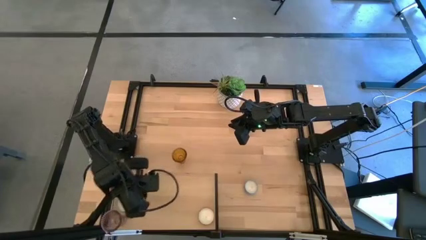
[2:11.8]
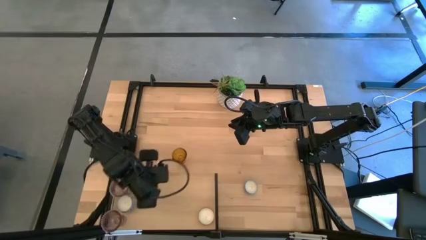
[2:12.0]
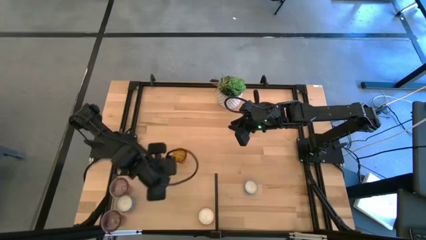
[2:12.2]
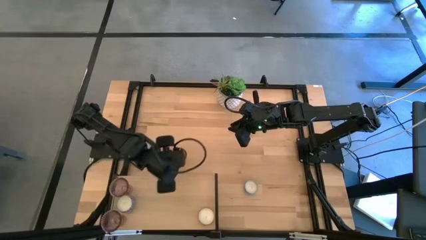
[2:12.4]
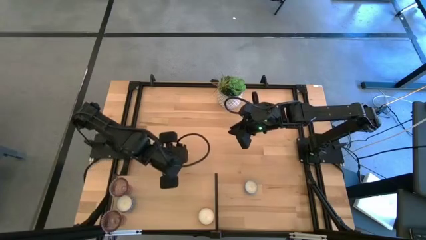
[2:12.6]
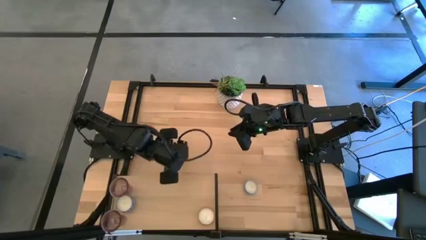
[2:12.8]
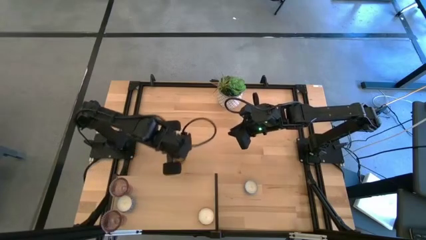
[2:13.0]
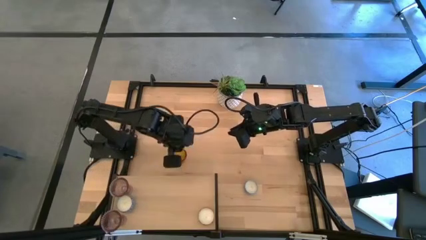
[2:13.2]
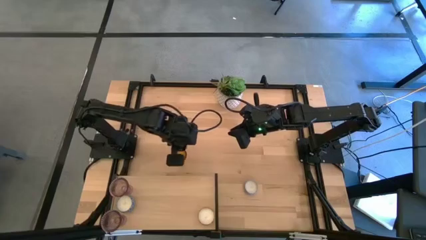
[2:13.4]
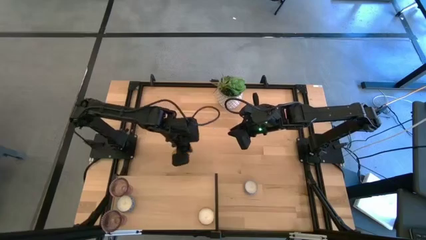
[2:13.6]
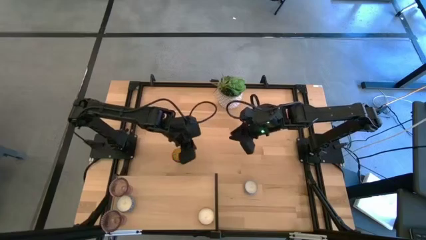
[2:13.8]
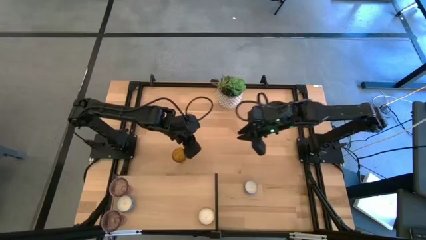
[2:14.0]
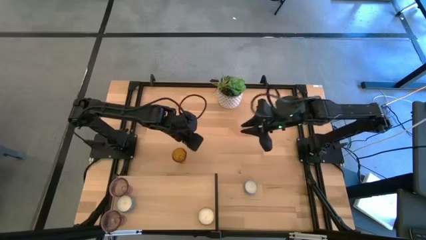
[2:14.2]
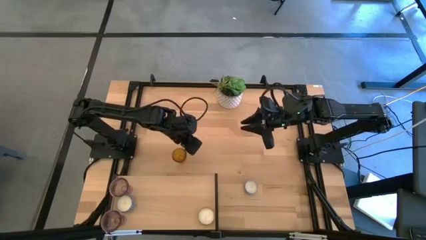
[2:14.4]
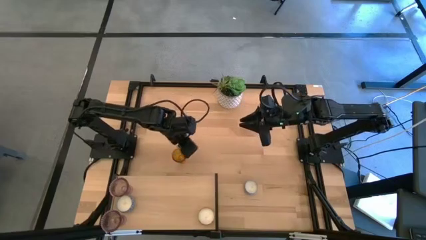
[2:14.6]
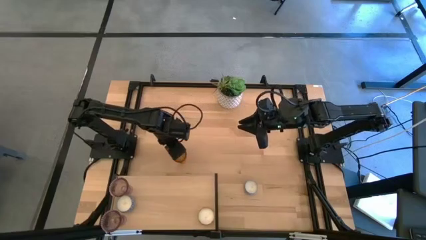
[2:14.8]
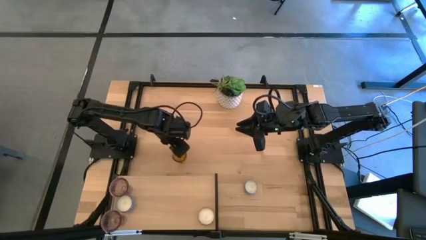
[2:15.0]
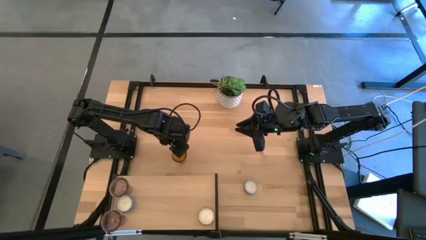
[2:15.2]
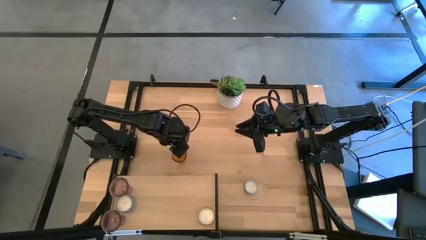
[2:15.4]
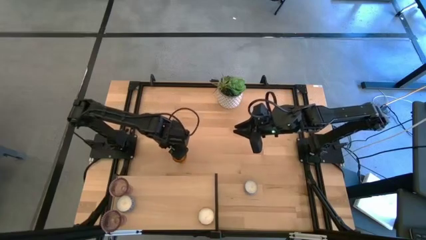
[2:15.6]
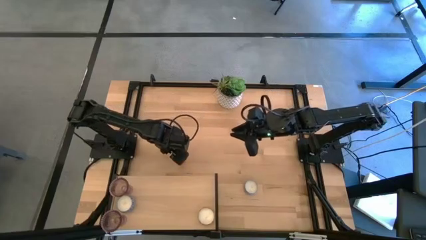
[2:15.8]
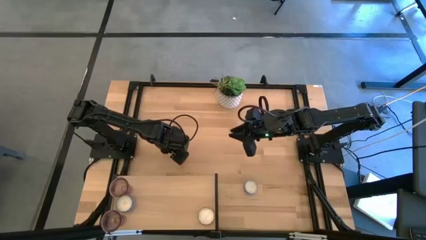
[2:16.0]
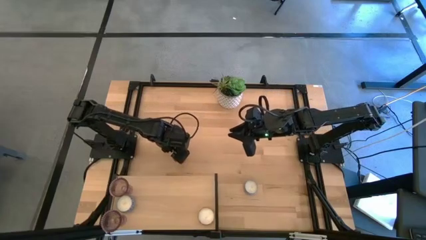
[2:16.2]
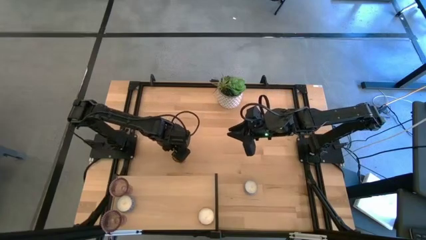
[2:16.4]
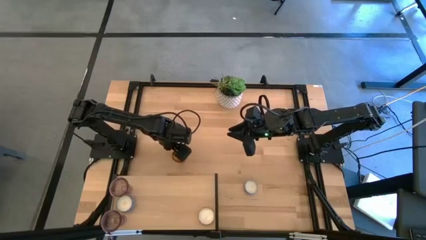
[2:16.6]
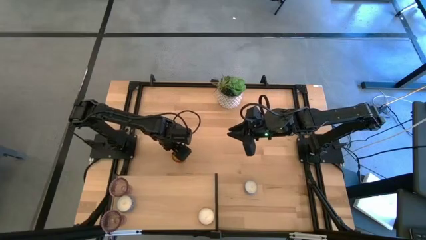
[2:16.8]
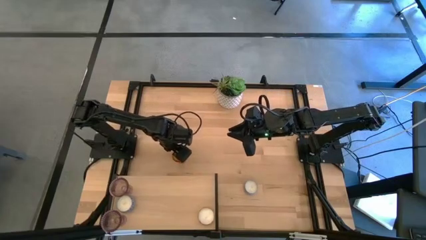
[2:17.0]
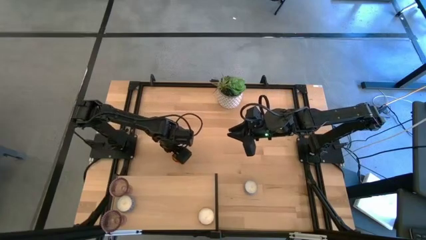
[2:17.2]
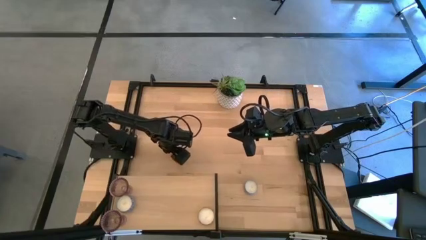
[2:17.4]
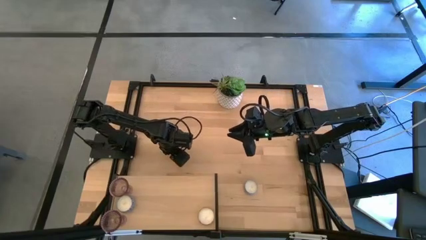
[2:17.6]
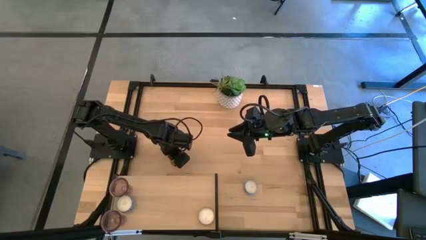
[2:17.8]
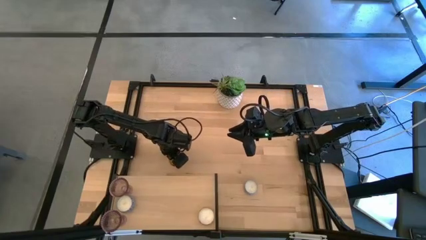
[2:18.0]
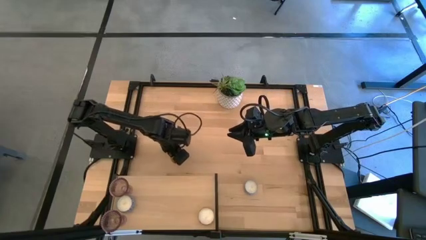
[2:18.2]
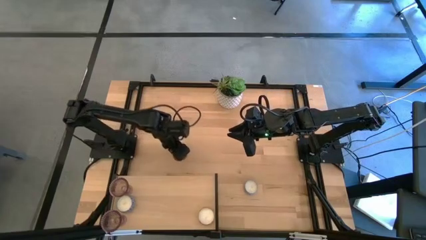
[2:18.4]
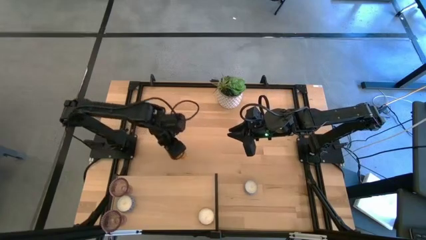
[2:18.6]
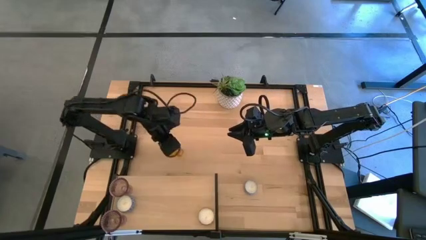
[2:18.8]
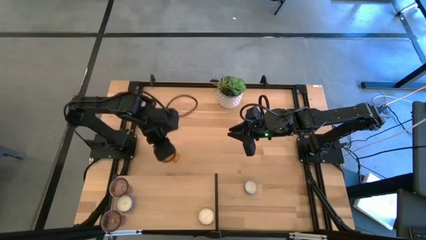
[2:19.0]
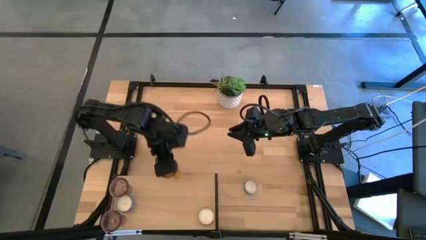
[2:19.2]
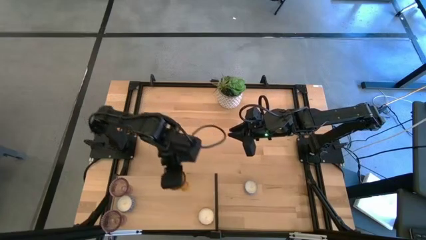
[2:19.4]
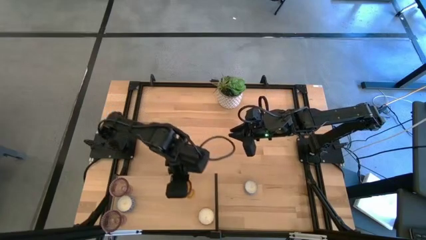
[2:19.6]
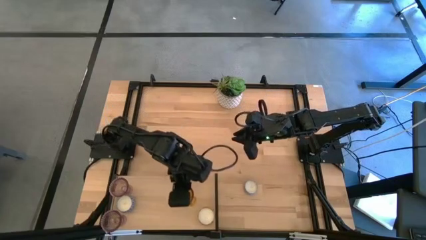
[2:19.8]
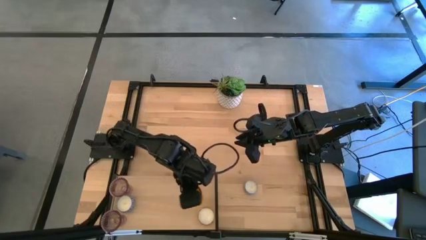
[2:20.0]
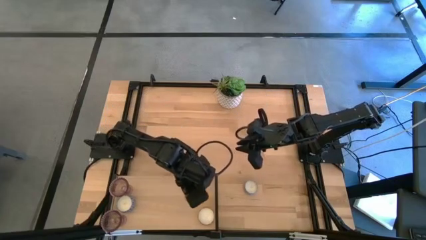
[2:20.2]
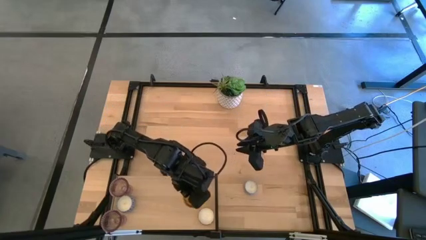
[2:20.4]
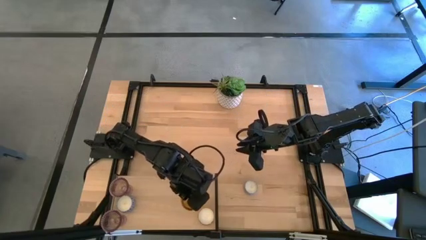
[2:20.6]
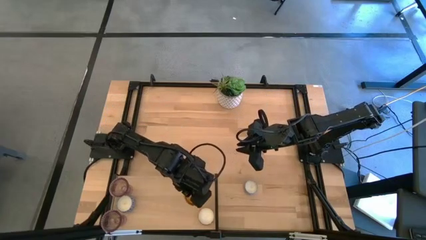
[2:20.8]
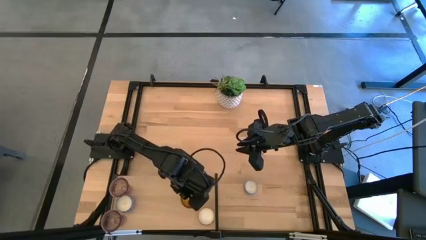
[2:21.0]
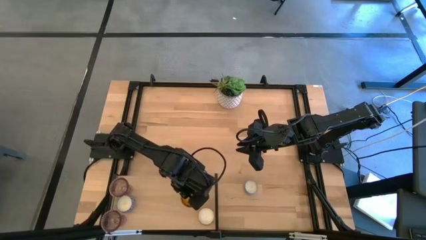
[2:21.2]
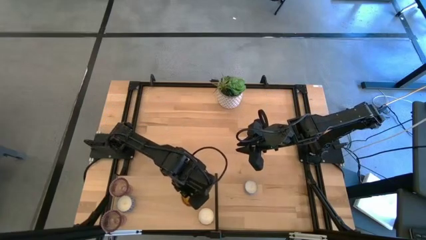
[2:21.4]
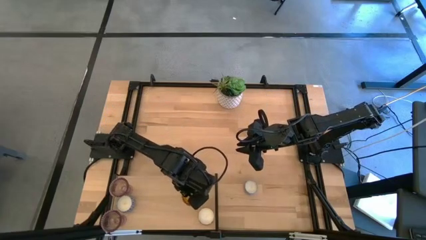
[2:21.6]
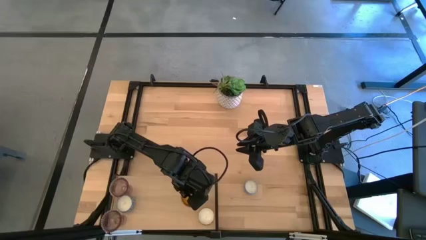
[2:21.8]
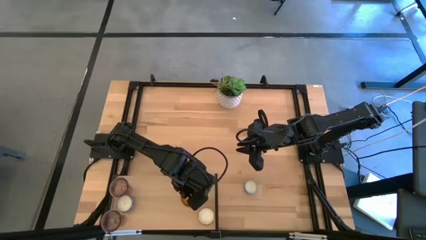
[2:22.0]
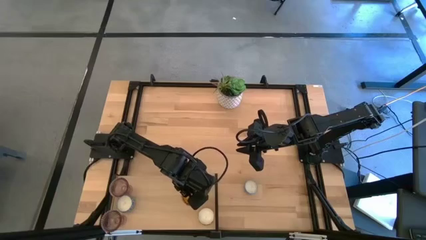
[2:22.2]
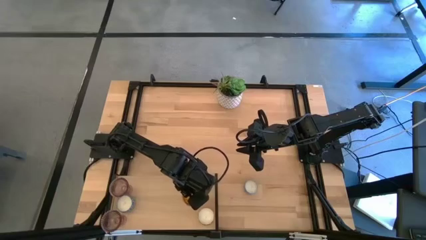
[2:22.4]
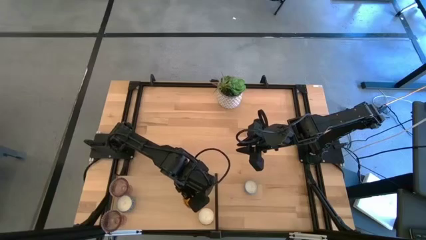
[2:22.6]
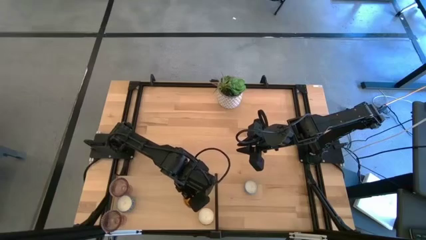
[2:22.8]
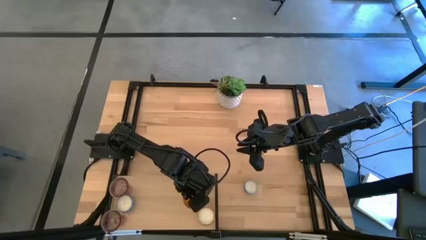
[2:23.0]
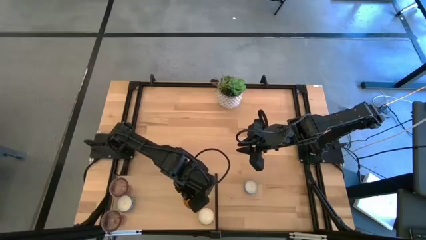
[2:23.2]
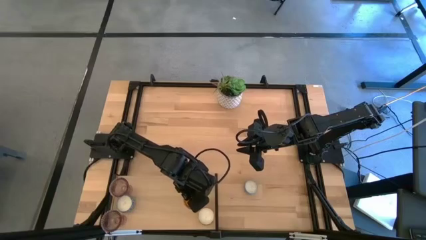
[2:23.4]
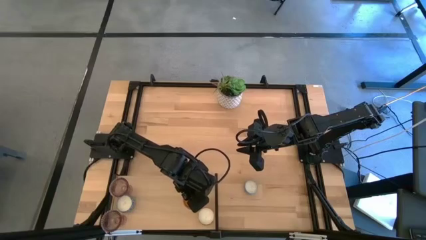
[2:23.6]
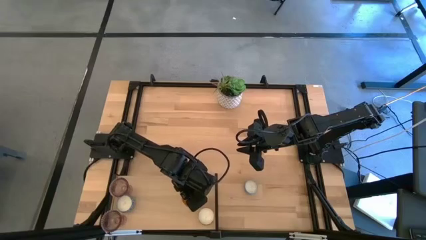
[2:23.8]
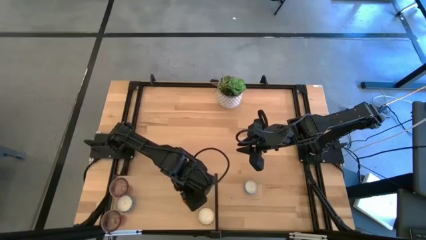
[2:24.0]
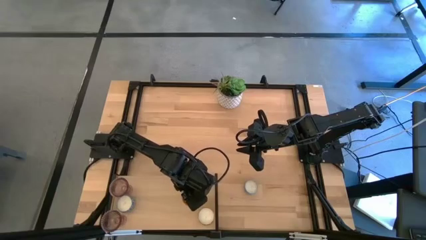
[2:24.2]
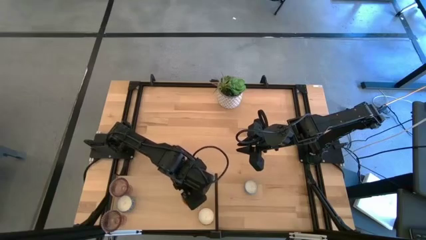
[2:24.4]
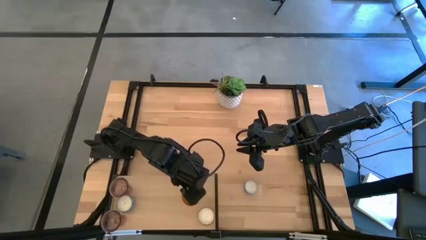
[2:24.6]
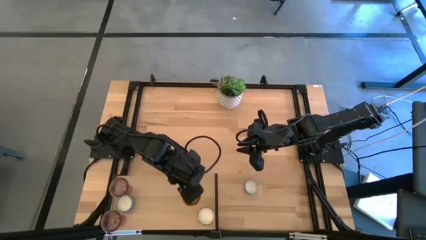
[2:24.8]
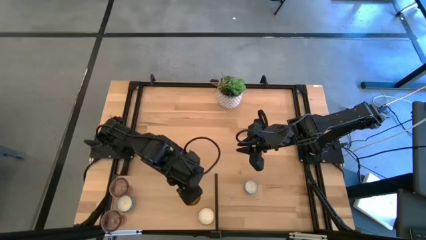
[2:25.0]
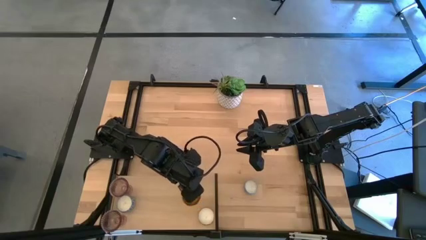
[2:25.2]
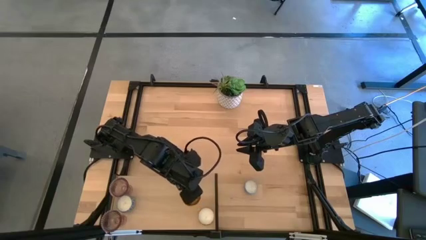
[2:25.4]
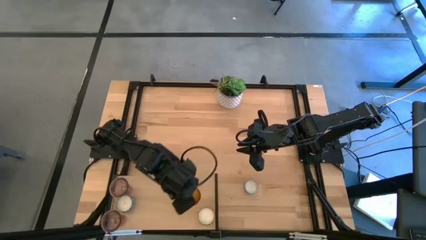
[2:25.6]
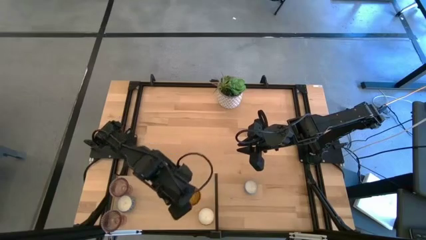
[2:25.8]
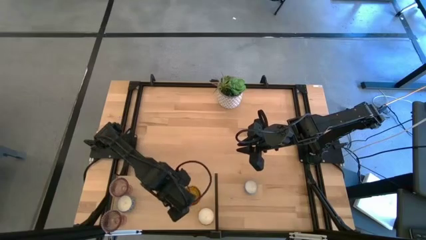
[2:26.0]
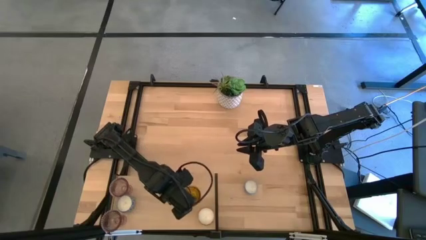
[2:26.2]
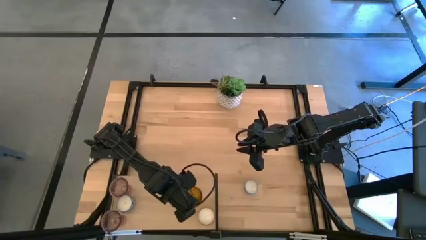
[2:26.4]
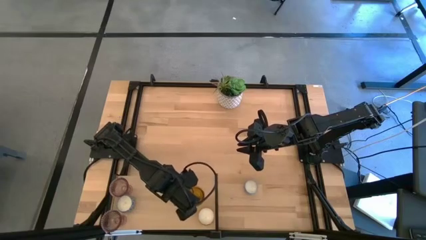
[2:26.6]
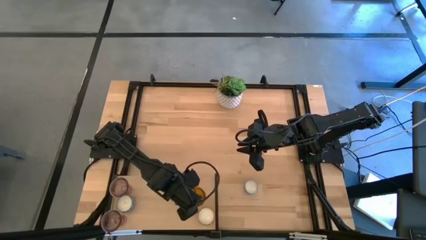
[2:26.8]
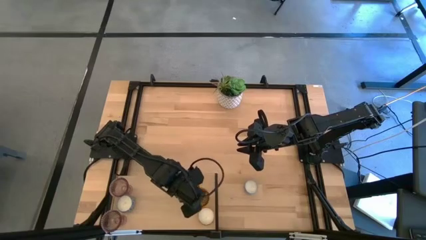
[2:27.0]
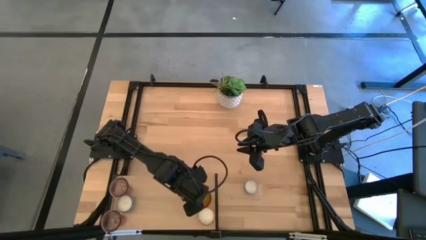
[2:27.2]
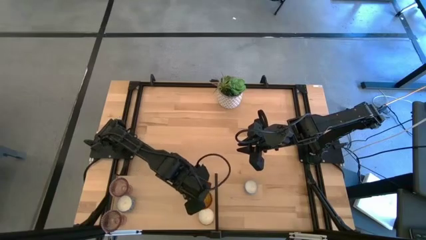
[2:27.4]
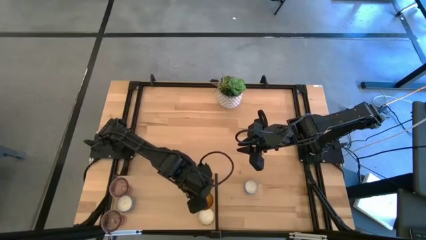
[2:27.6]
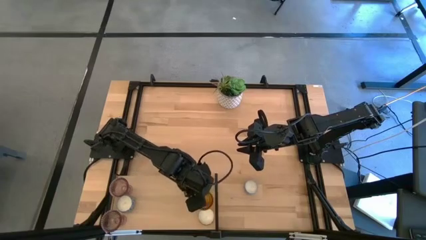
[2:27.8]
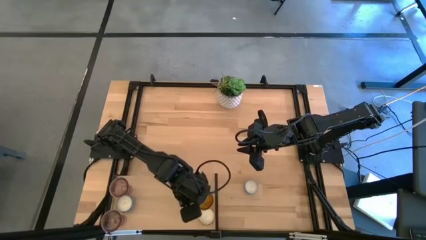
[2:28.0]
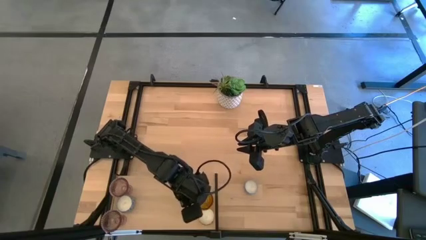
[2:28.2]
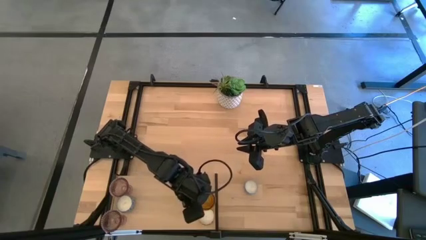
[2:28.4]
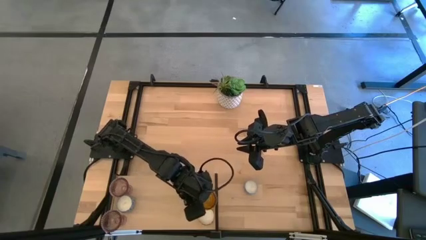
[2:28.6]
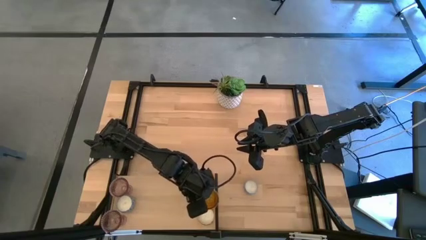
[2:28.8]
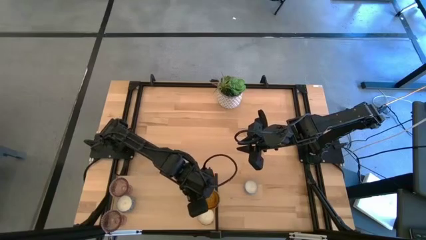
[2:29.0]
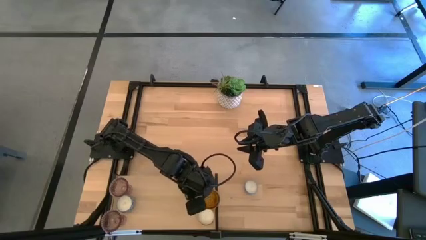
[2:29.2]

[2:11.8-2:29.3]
Task: Pick & Place candle stick holders
Put the yellow glass on the shelf
